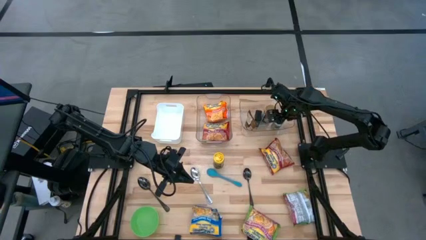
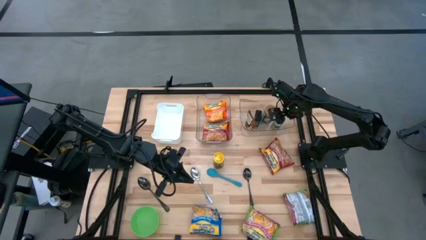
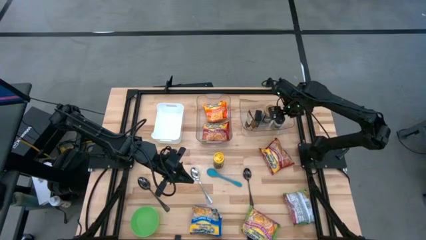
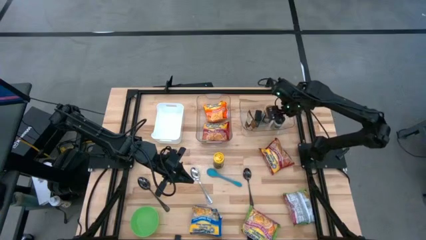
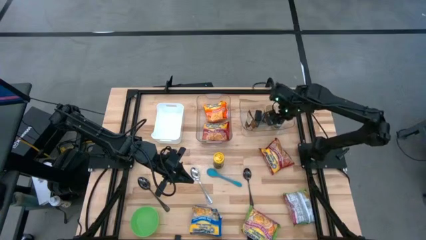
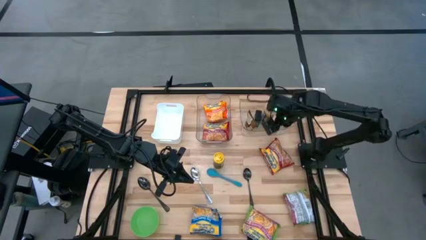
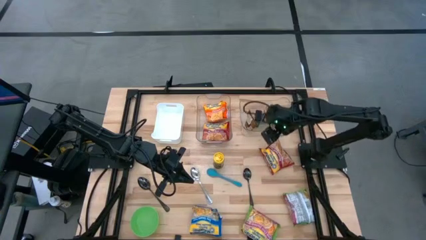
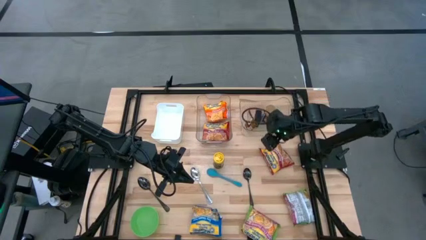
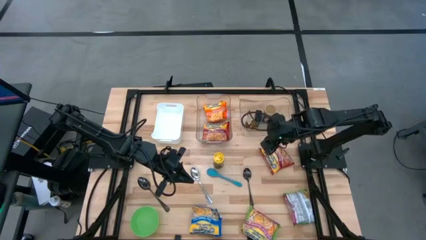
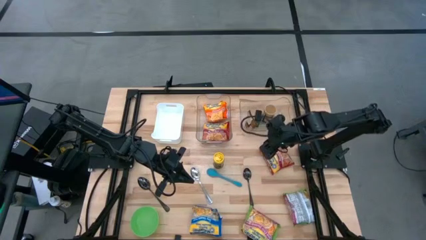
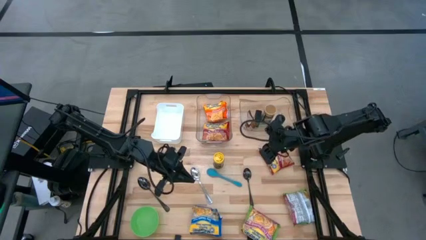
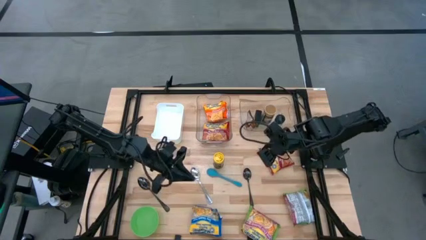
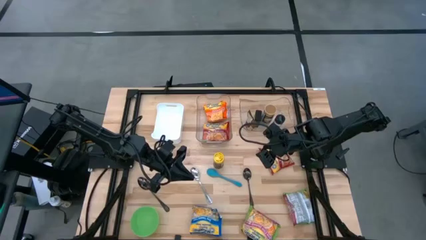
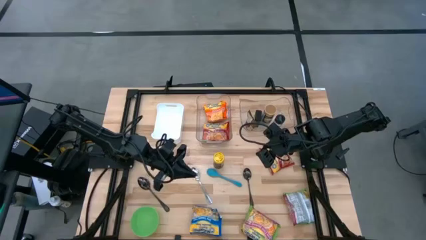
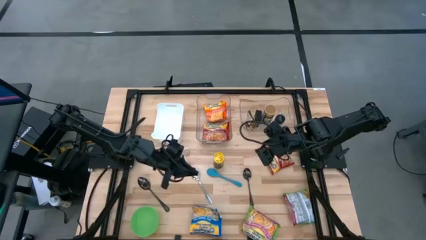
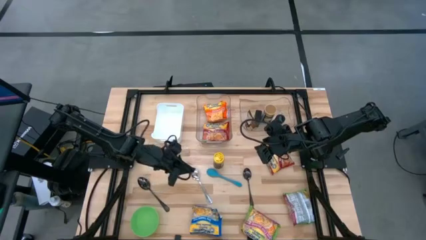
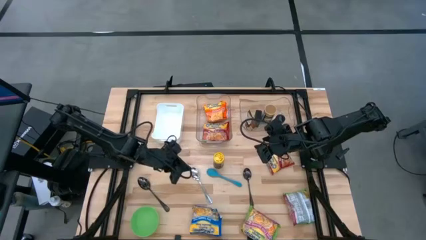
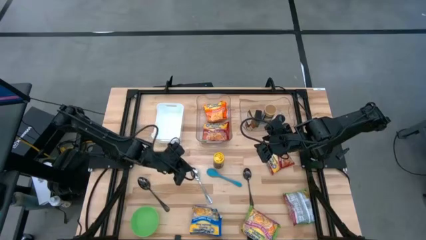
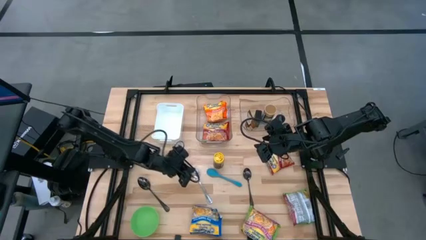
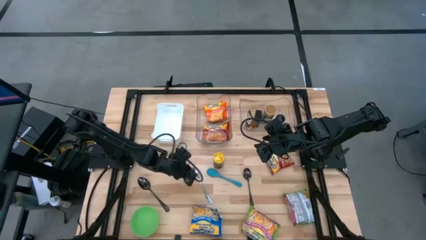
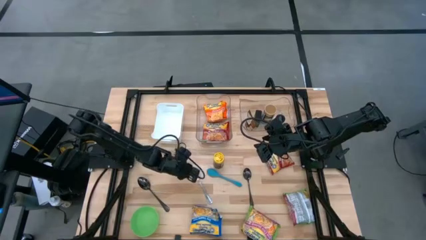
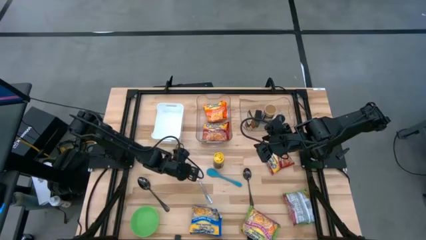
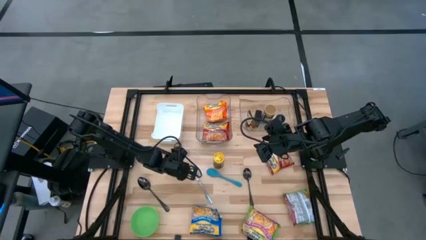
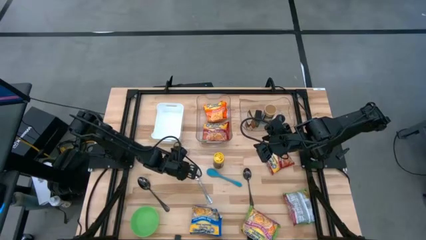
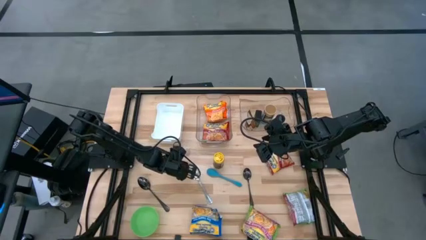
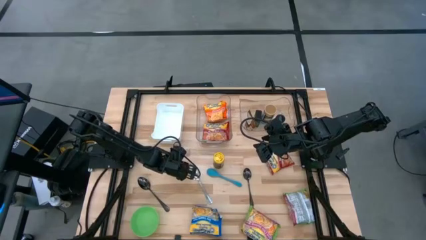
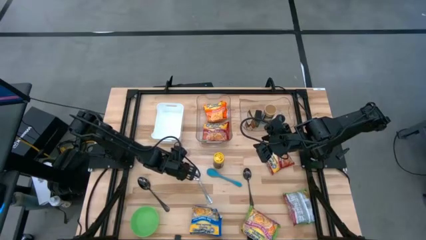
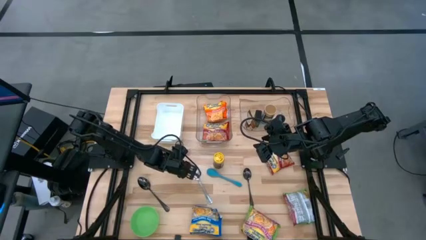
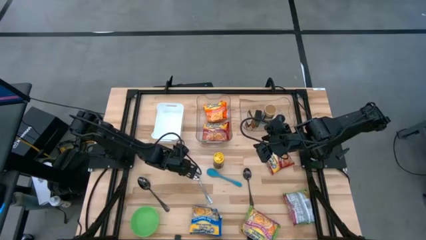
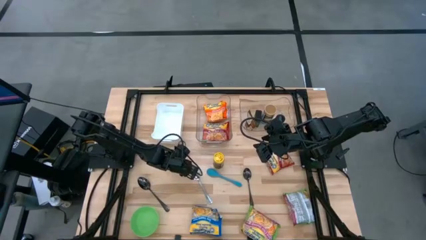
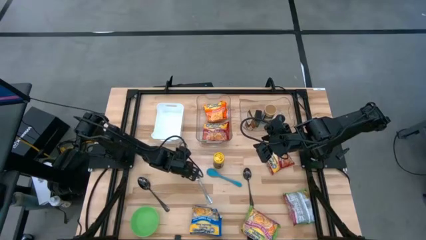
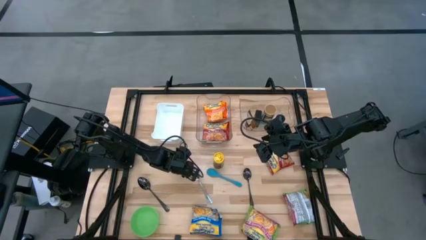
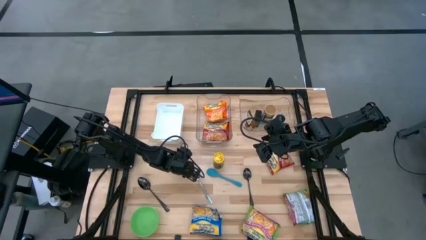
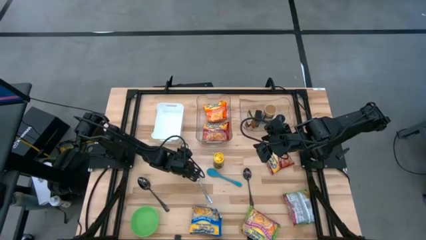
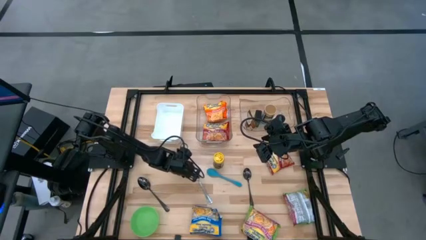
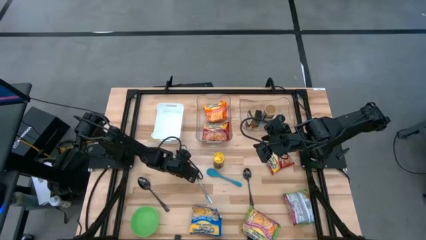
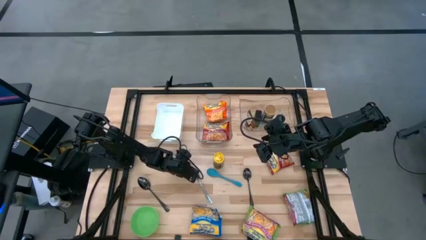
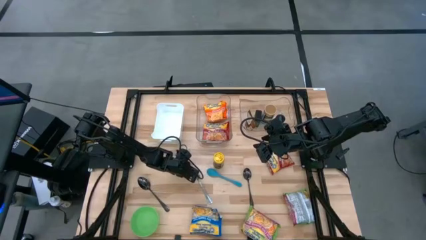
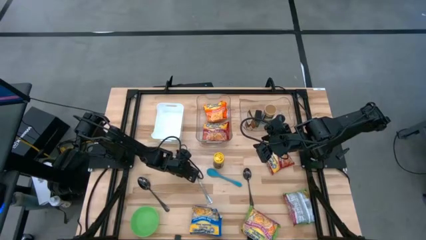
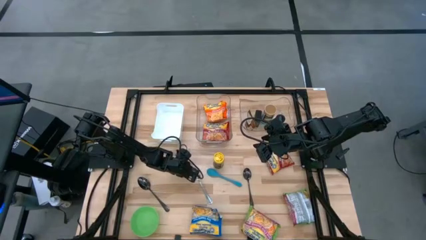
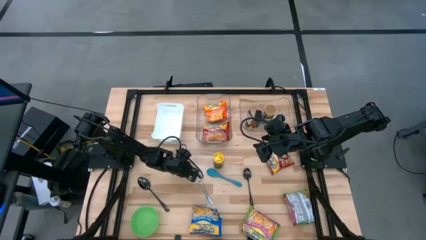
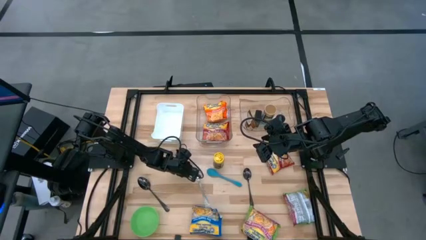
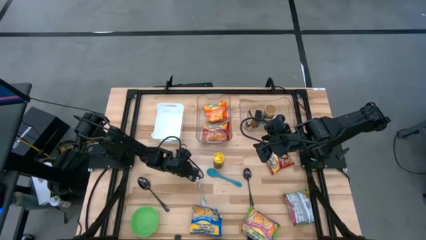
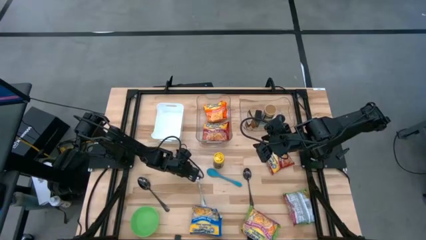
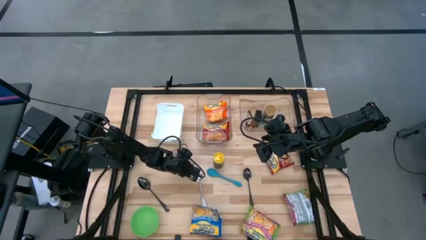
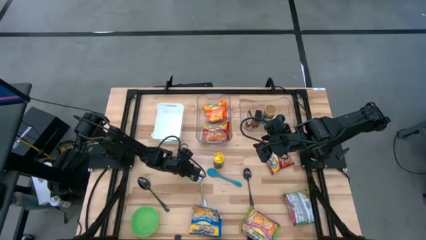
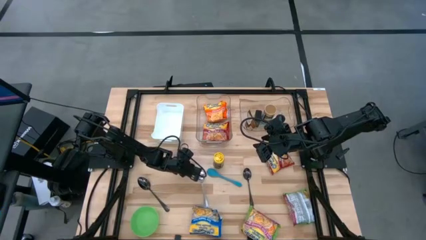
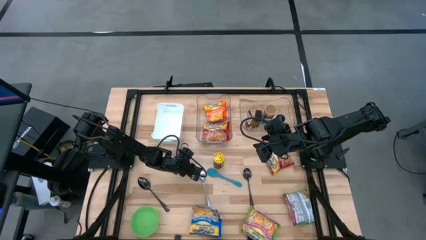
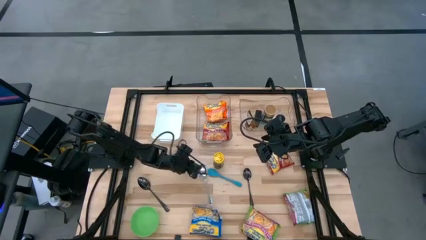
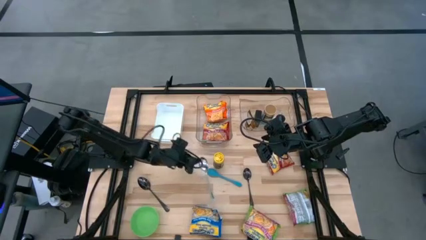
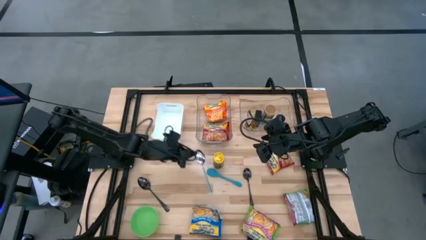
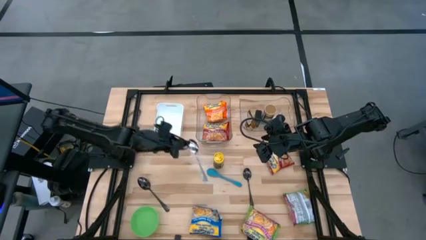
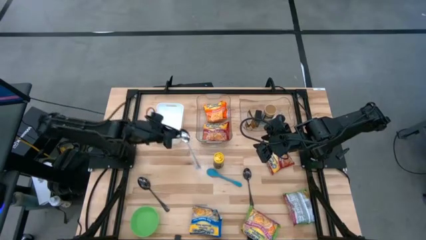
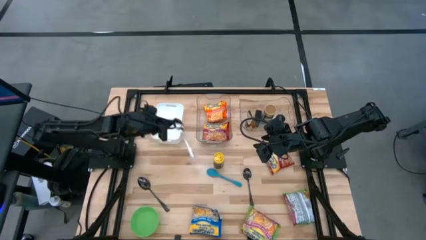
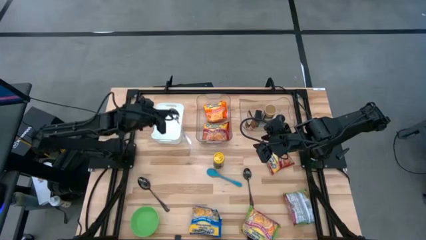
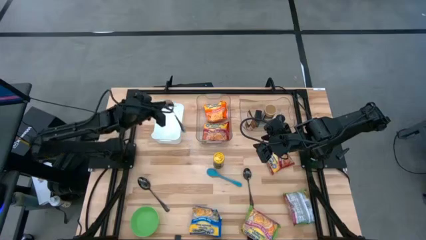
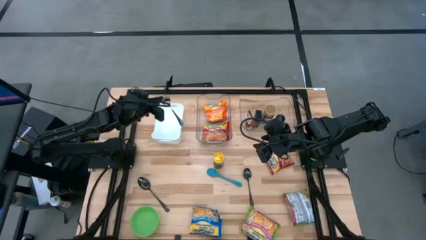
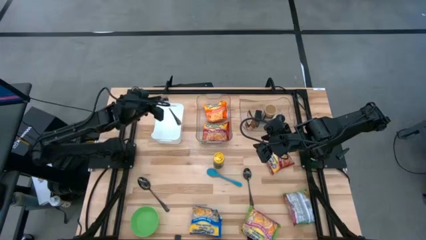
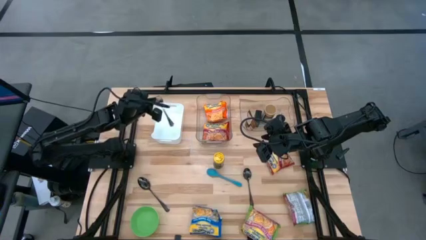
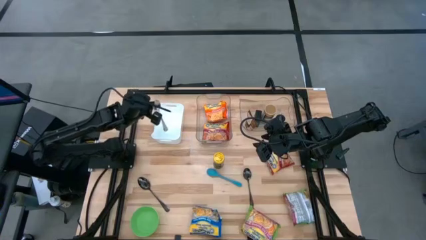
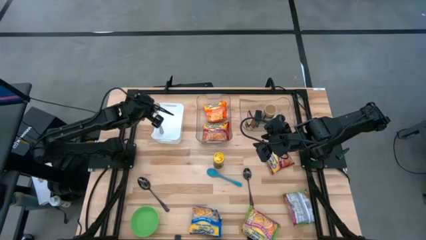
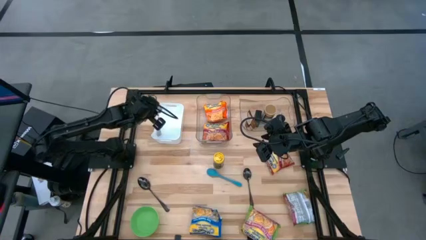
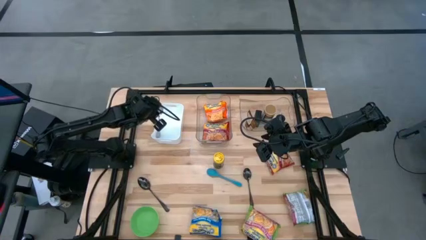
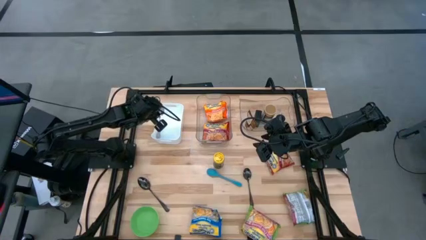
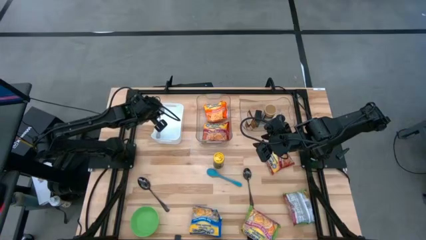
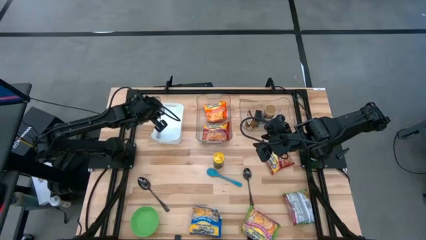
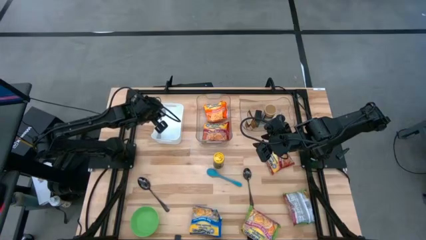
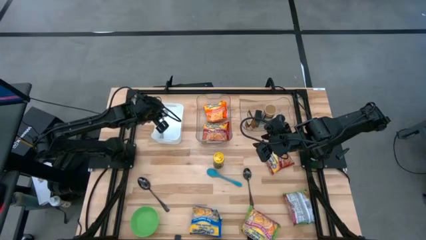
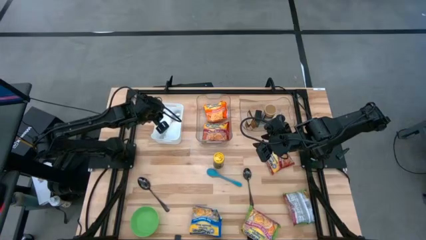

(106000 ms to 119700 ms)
Task: Pick & Place Food Item
Put the silver spoon into the white bin

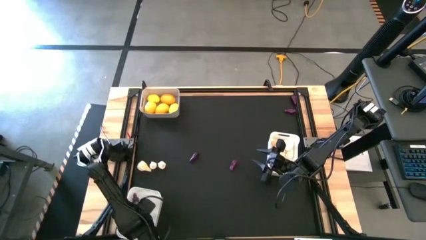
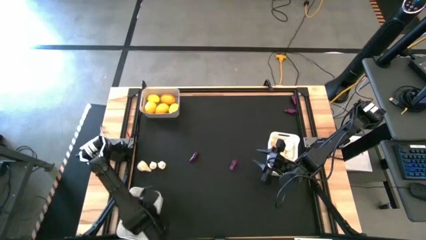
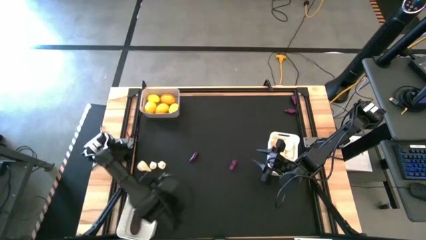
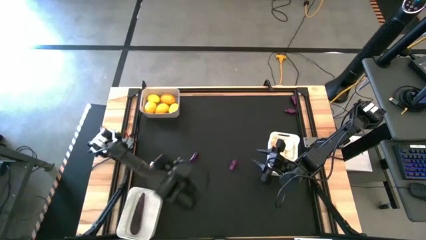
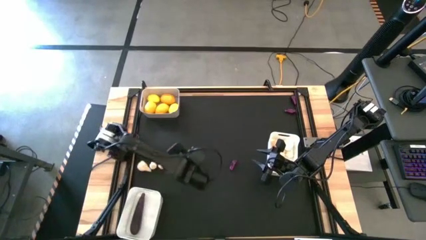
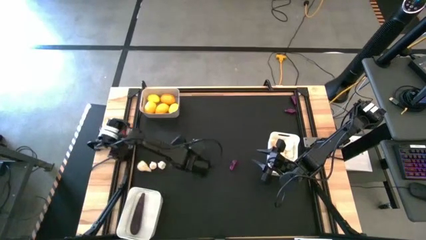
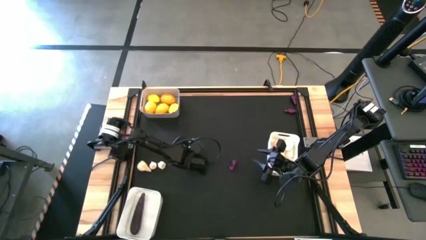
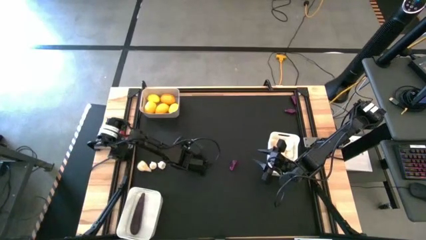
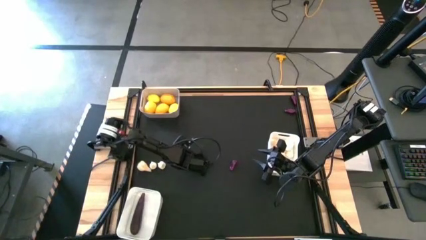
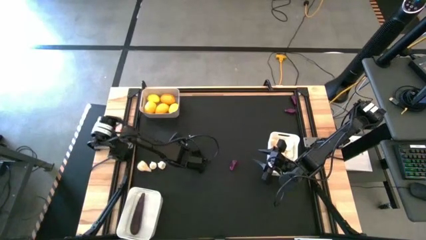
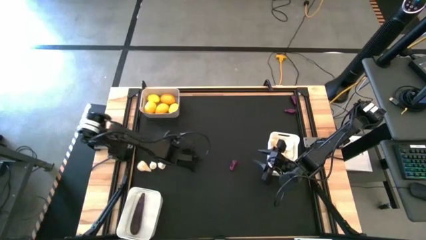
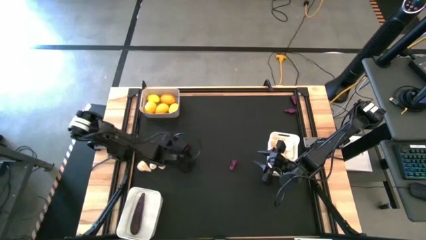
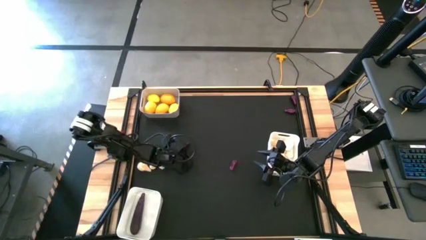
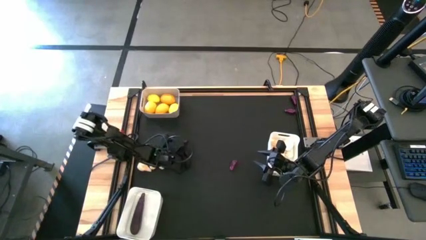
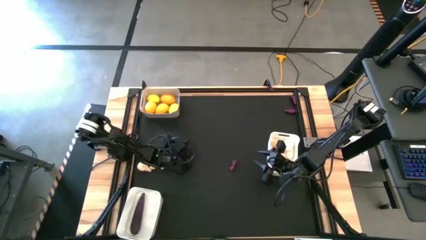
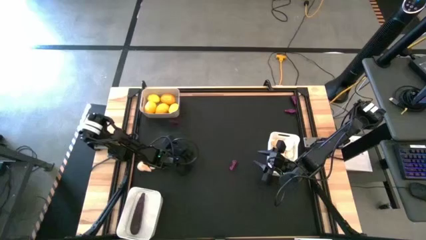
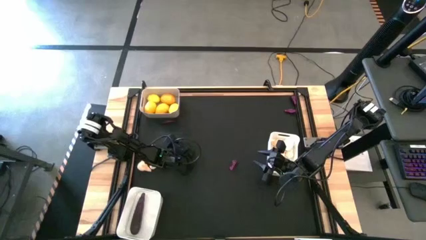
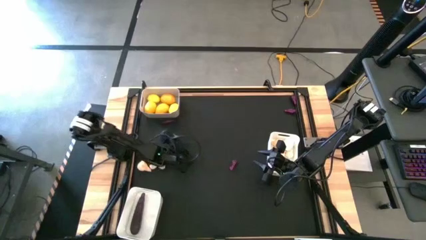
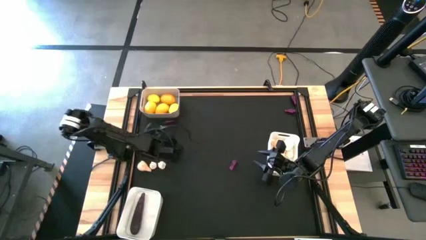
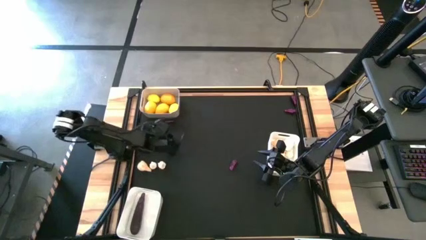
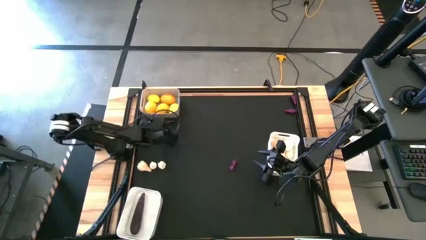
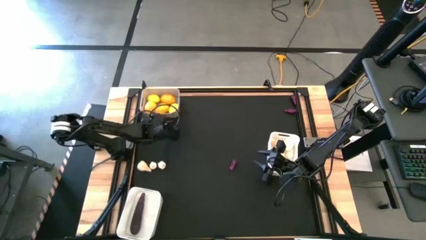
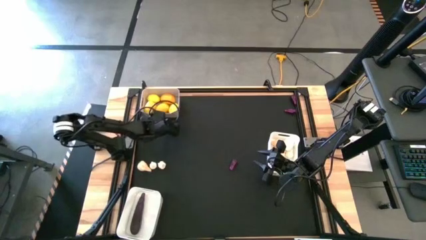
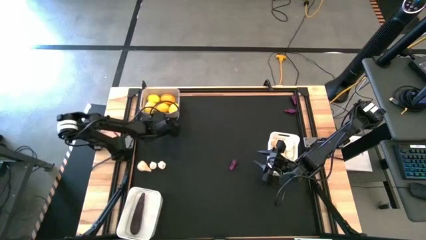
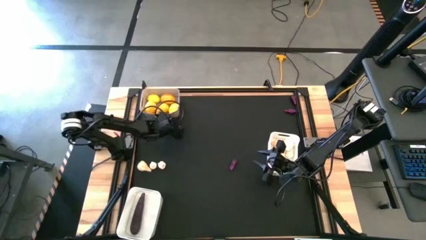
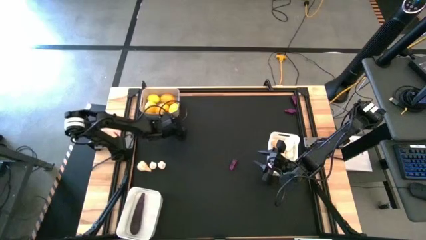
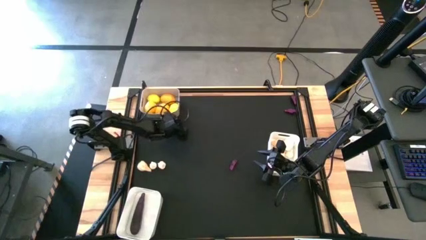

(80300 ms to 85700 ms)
Task: Sort produce into baskets
Put the bottom left eggplant into the bottom left white bin
